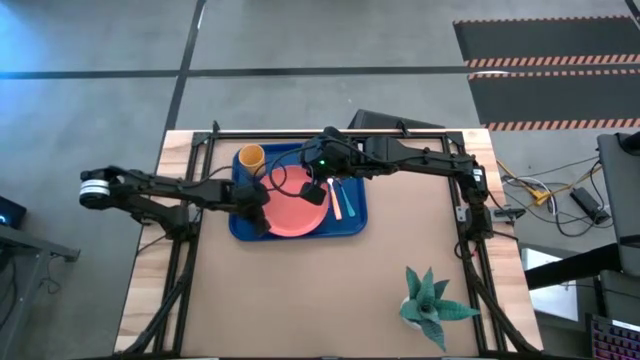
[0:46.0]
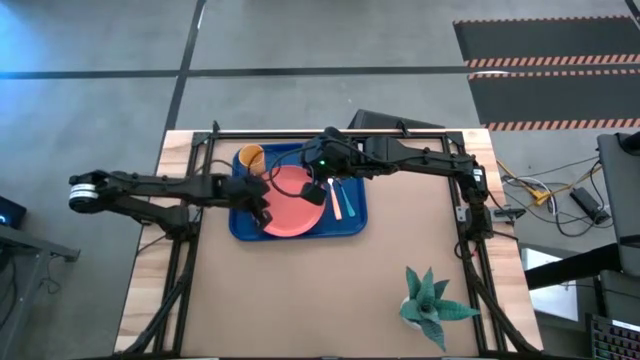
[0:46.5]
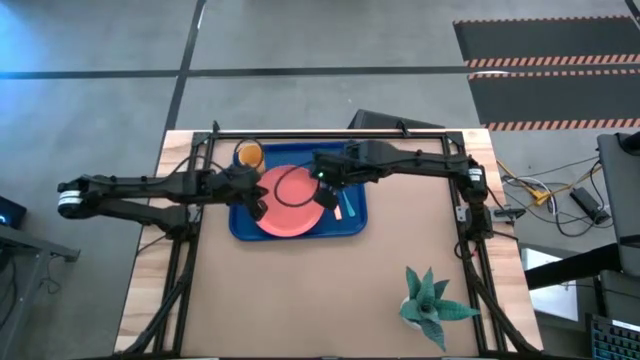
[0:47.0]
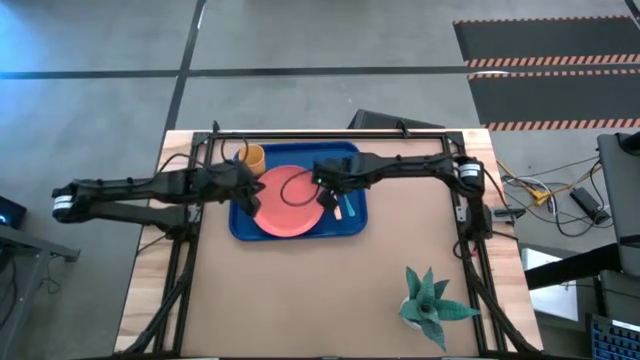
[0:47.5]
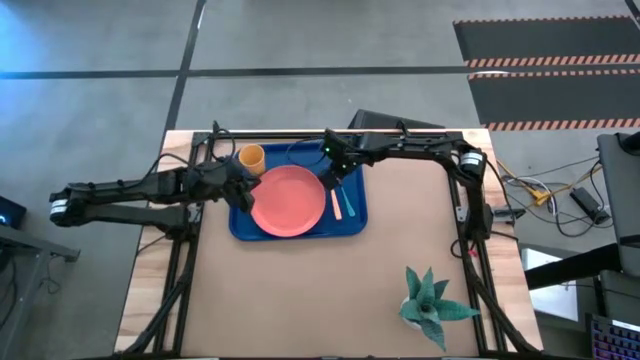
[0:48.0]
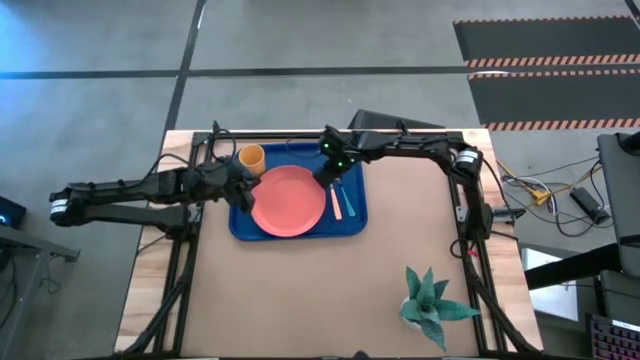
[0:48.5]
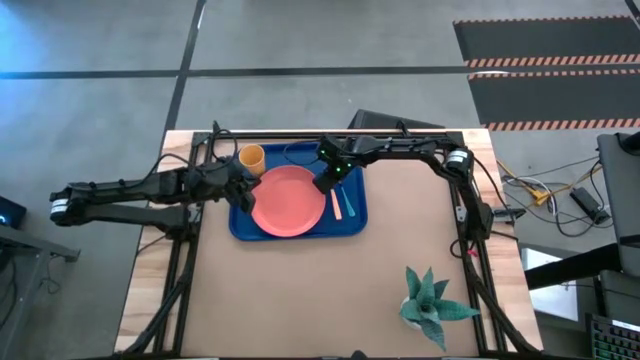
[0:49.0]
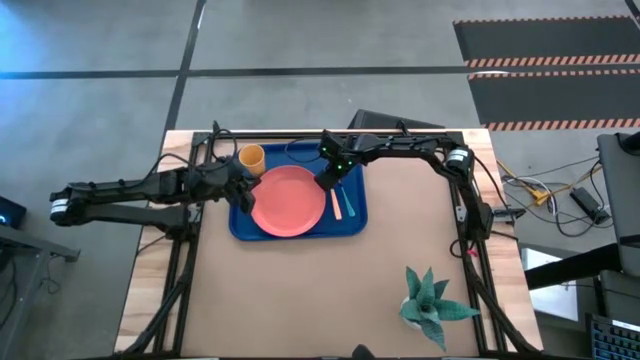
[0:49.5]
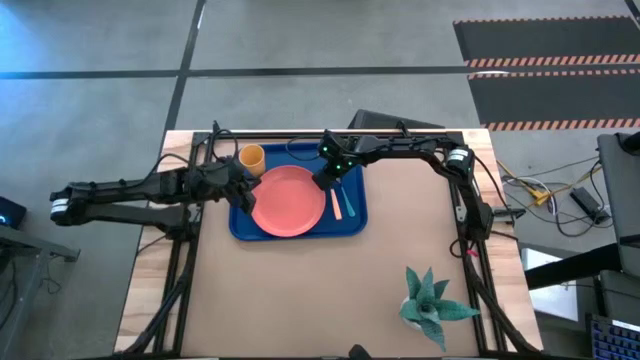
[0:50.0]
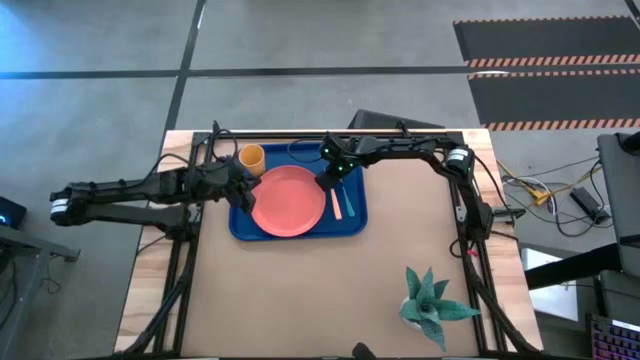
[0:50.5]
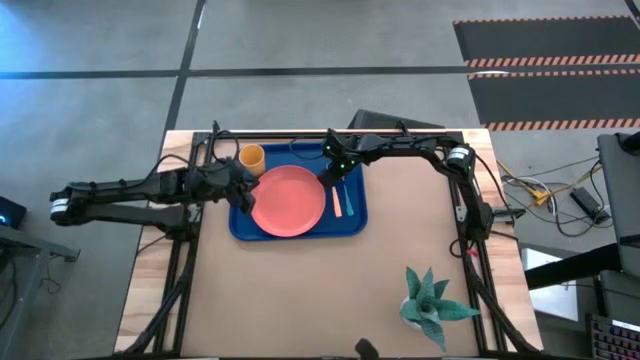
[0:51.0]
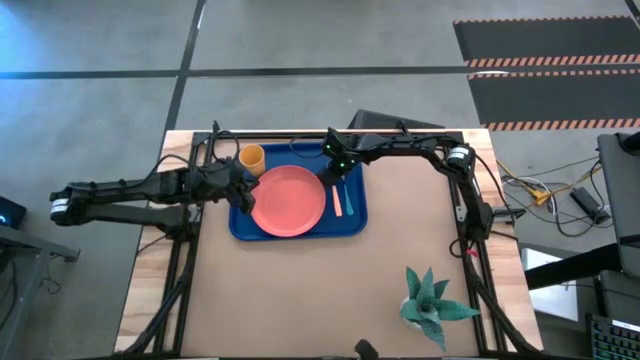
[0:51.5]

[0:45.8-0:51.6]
Task: Pick and place plate/cup/fork/spoon on tray
Adjust the silverwares on the blue tray

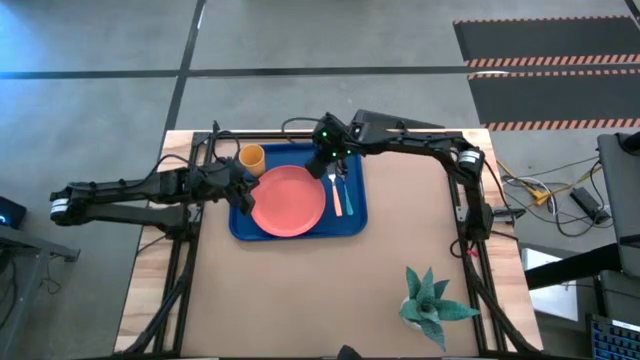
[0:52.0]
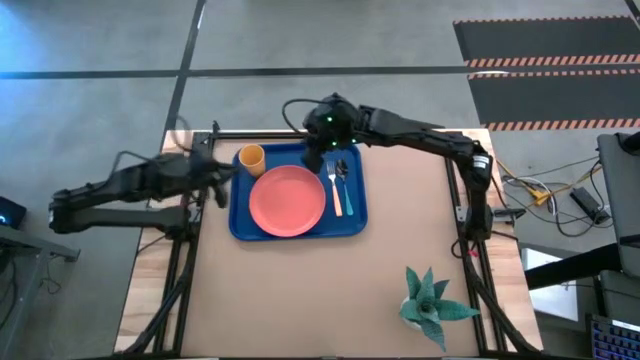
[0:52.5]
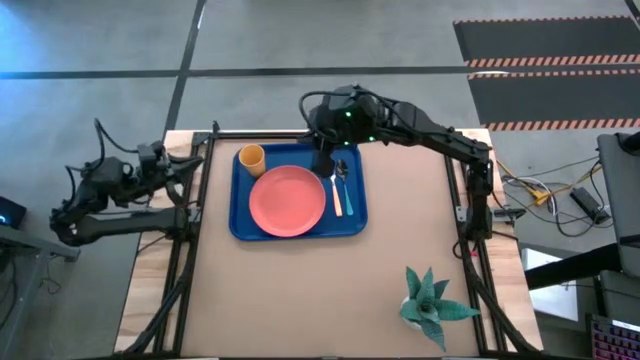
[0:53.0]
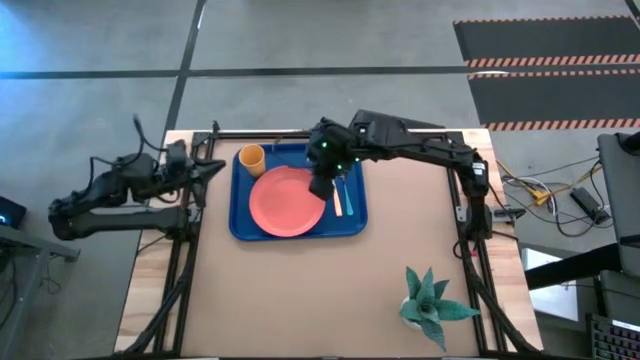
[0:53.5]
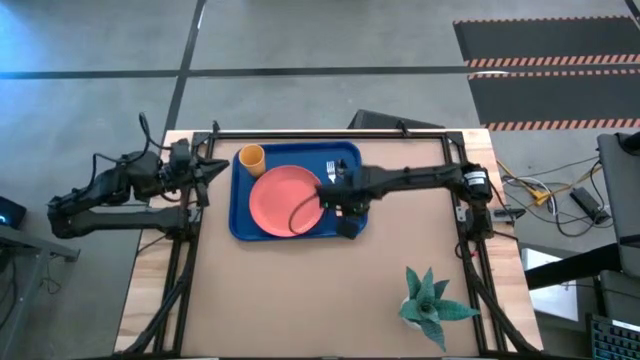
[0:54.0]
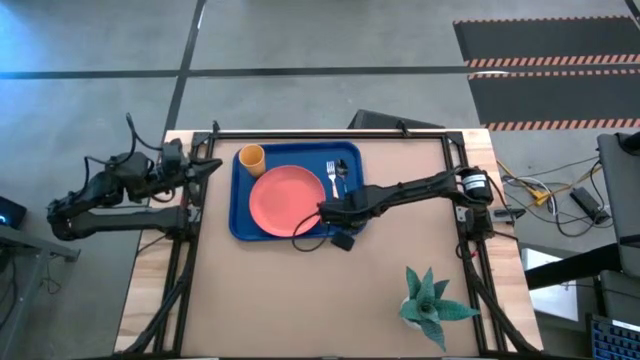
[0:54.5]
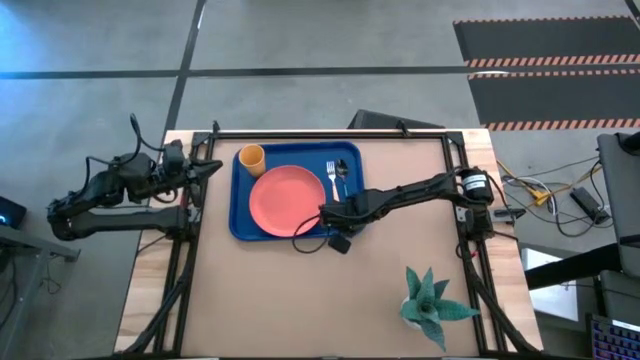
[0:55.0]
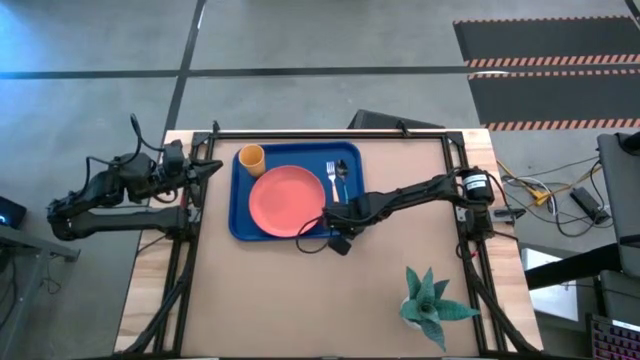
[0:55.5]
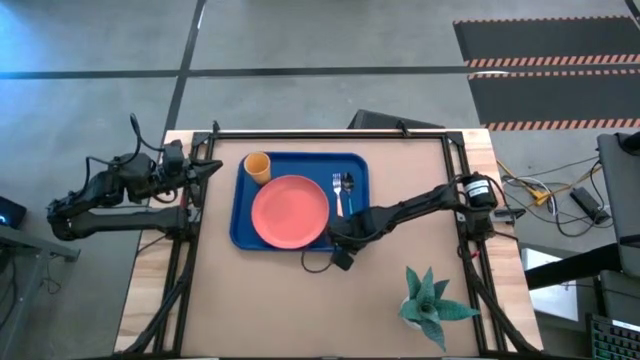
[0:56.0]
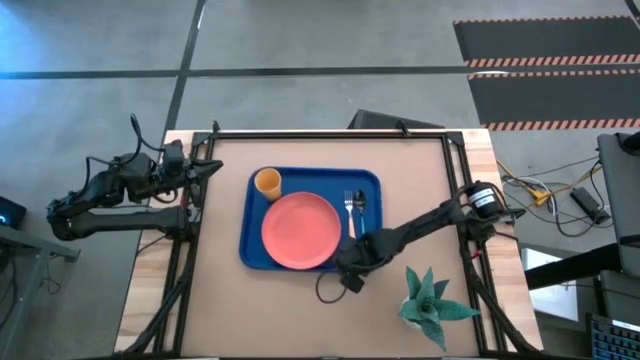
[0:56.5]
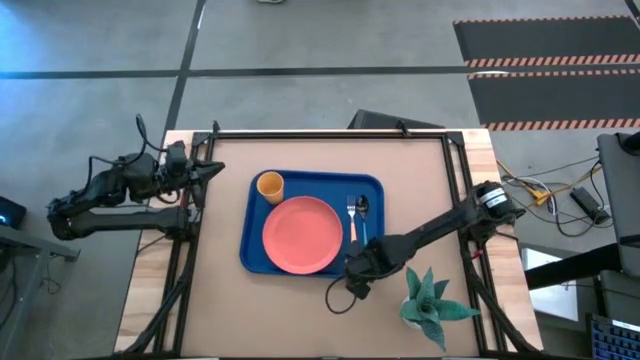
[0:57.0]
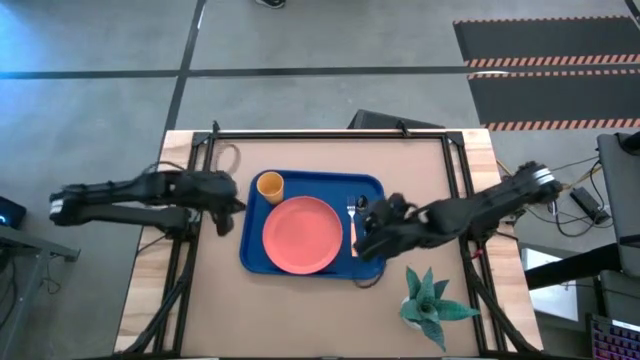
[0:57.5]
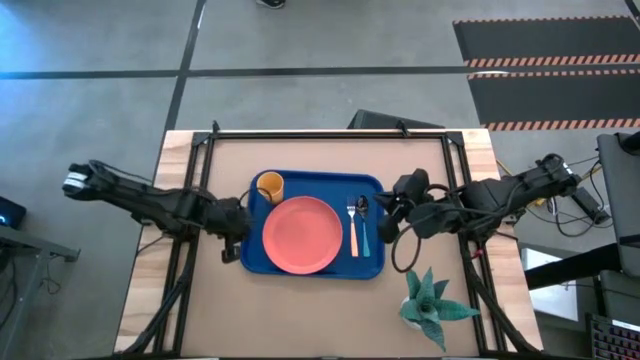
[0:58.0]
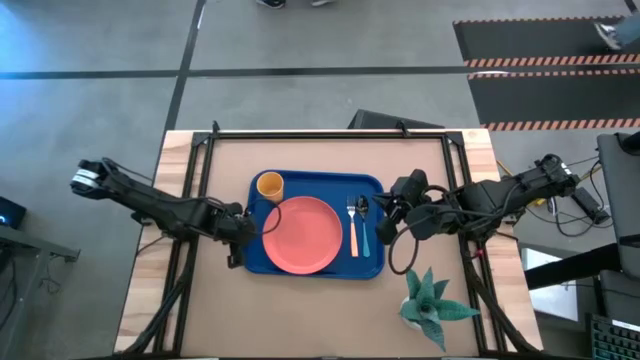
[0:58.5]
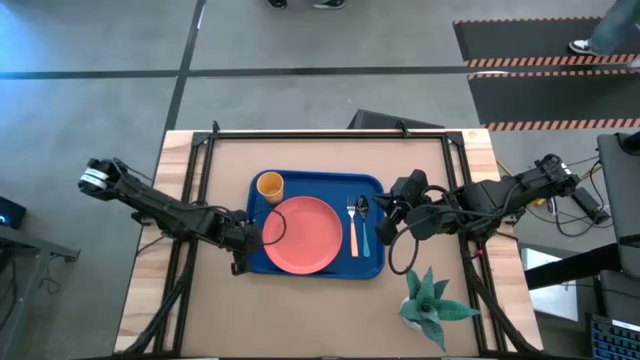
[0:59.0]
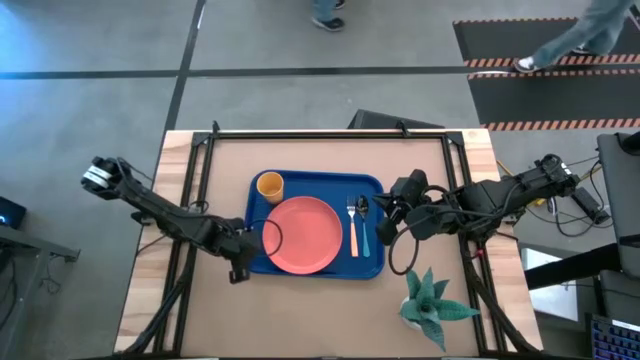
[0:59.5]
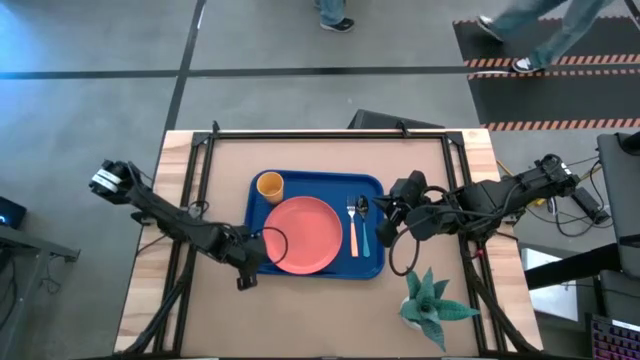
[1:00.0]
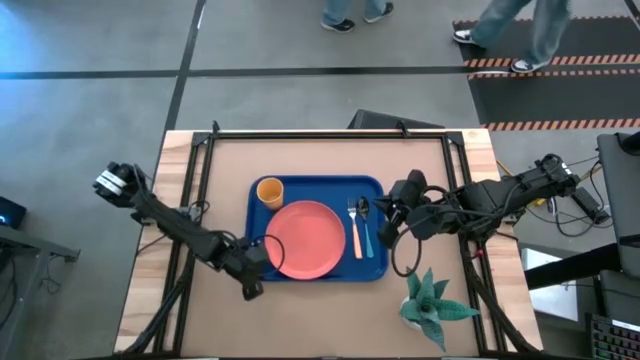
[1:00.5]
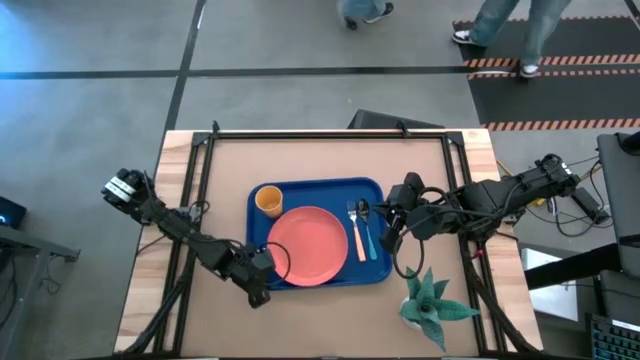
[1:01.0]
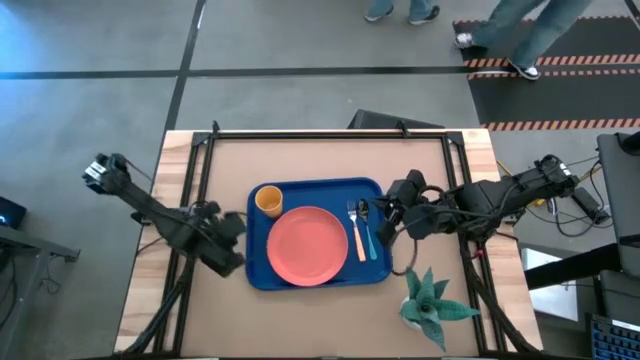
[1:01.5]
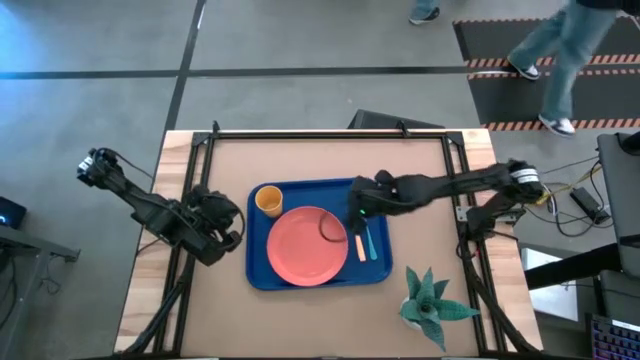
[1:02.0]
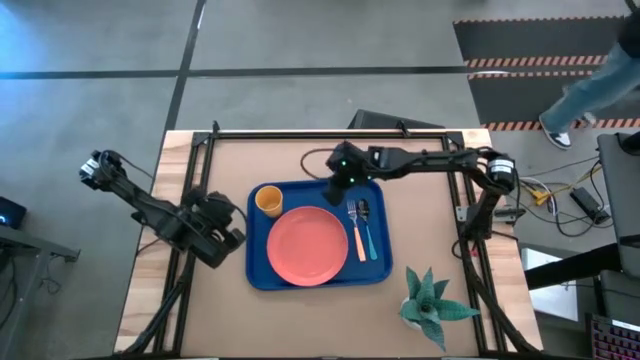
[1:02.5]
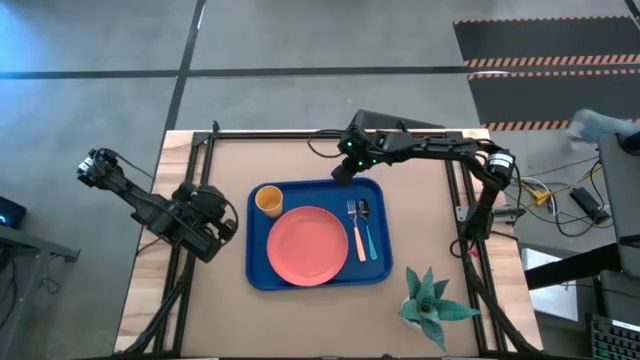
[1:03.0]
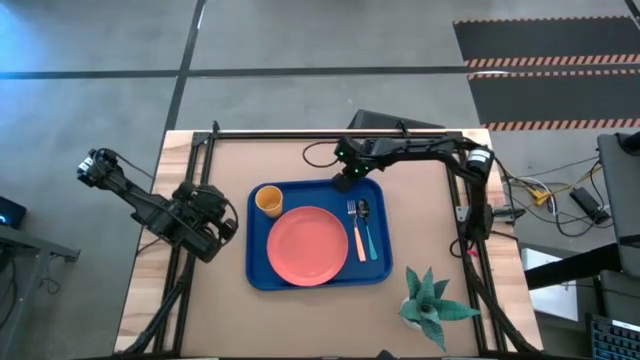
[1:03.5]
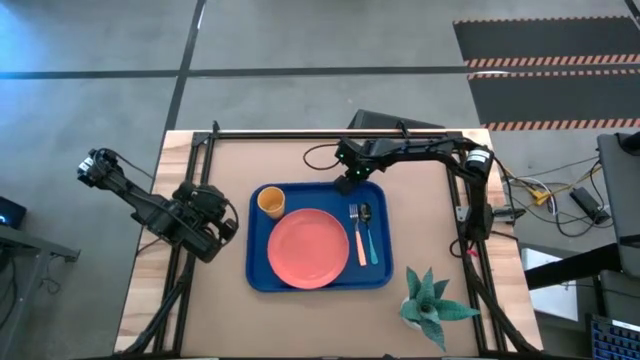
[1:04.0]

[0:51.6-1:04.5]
Move the blue tray to the center of the table

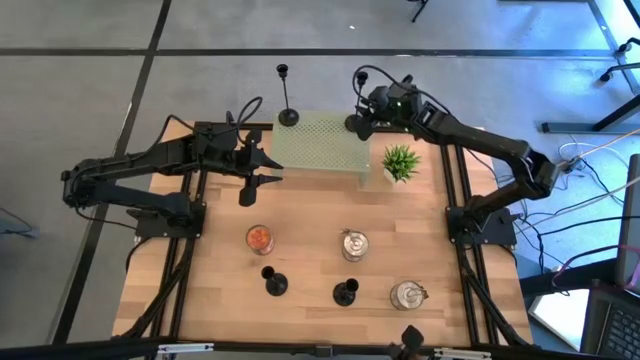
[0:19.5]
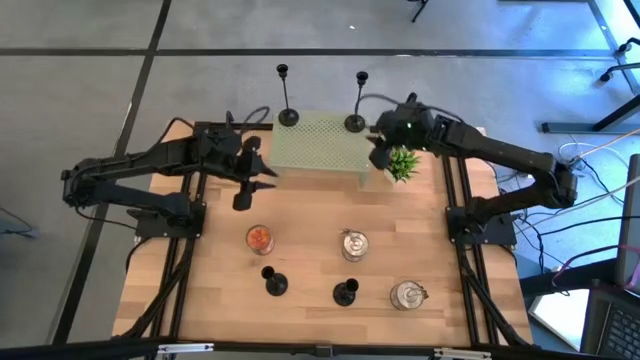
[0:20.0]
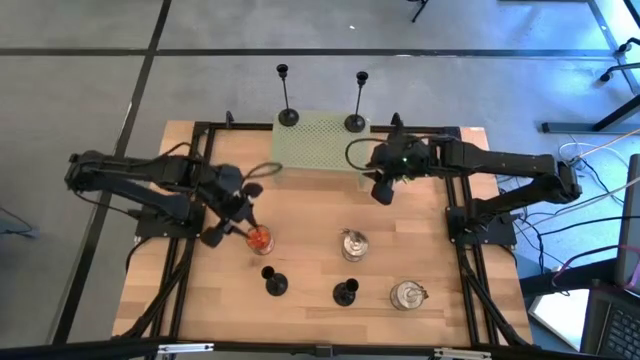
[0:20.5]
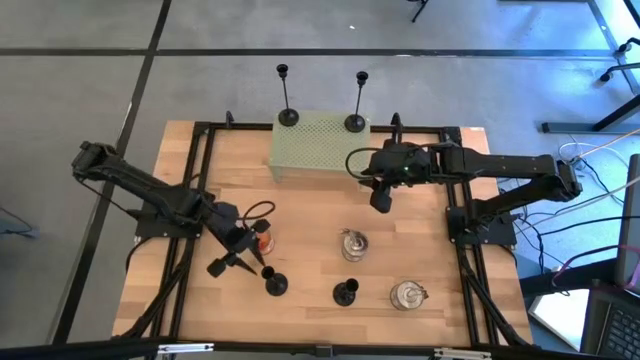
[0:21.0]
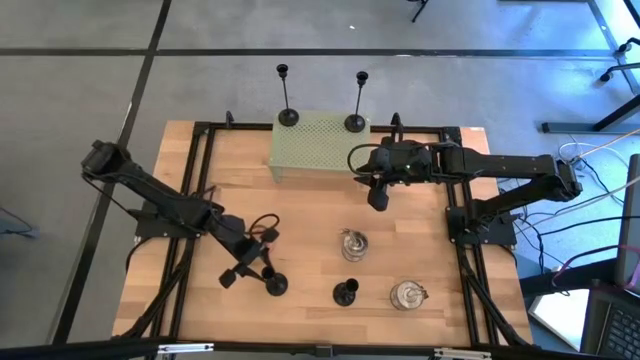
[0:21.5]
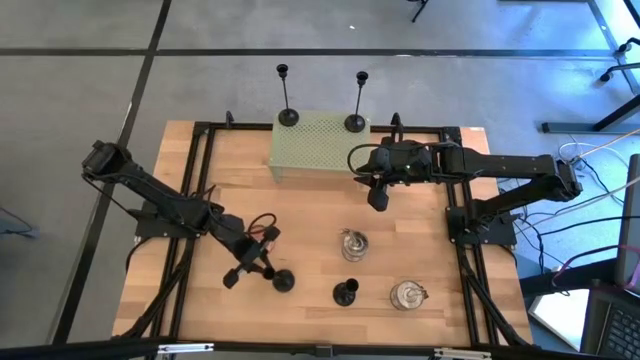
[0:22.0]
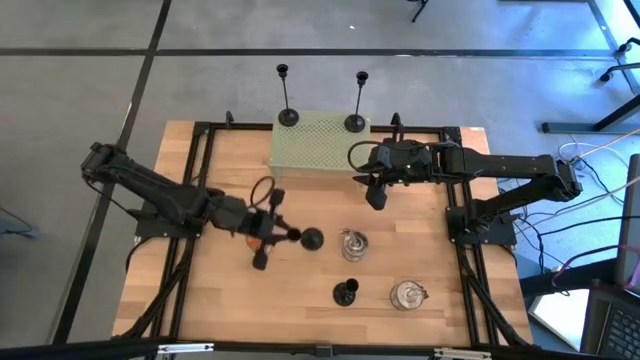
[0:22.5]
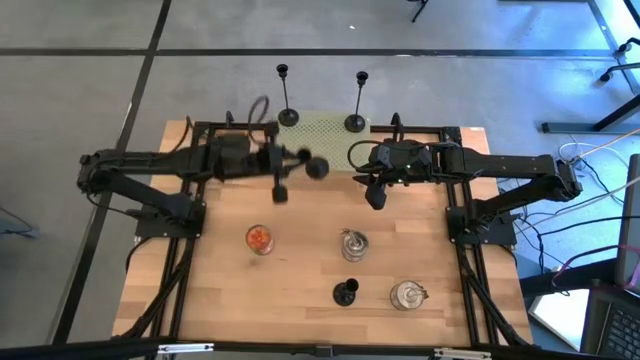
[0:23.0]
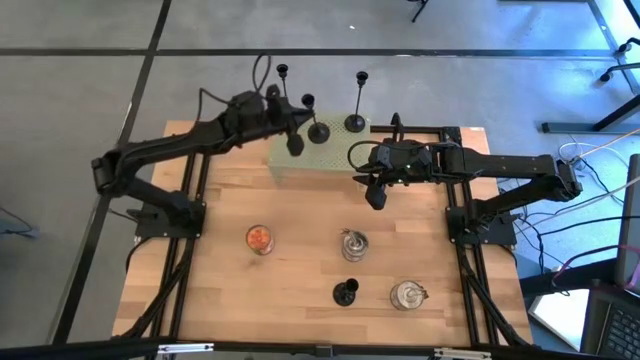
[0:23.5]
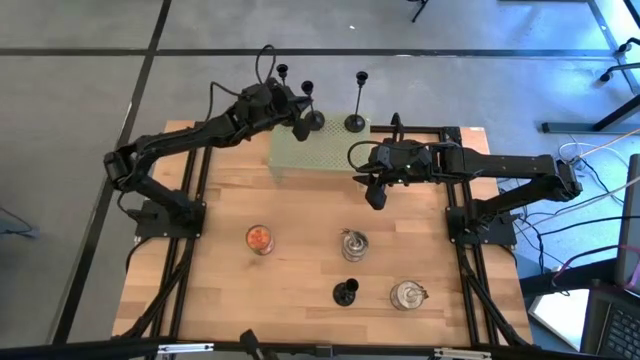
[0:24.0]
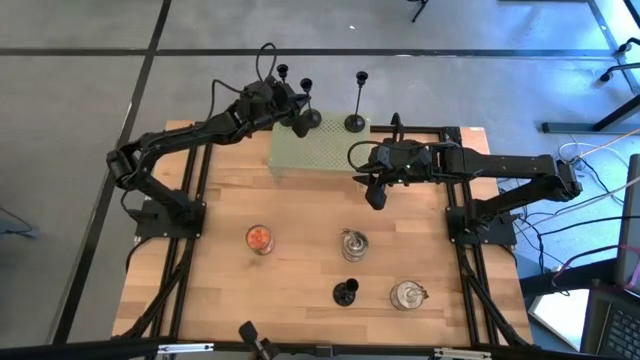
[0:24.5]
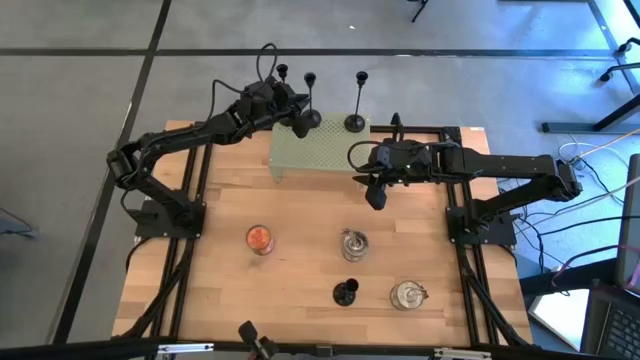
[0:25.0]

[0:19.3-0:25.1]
Task: Pick & Place candle stick holders
Put the left candle holder on the shelf aligned with the other candle holders
